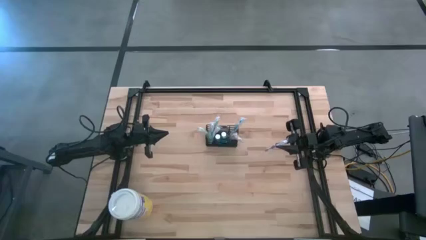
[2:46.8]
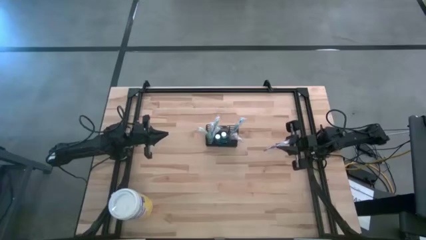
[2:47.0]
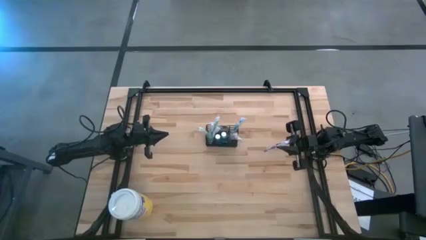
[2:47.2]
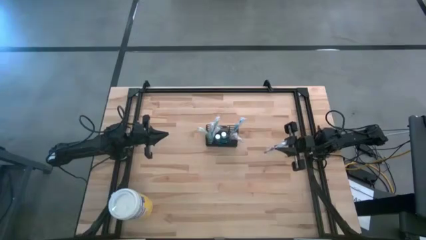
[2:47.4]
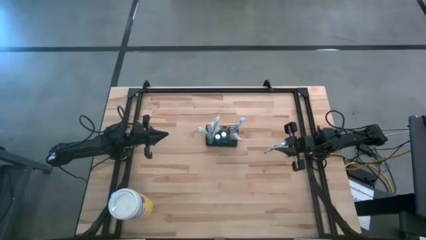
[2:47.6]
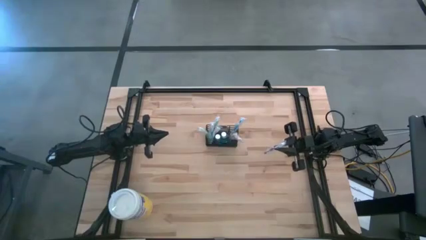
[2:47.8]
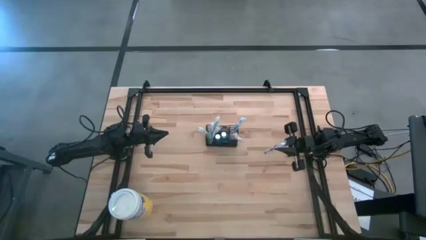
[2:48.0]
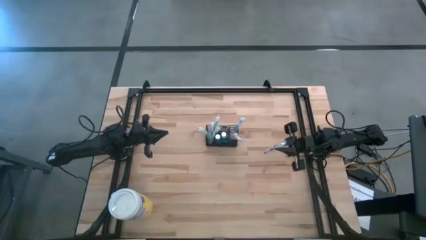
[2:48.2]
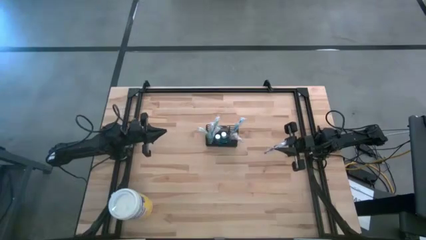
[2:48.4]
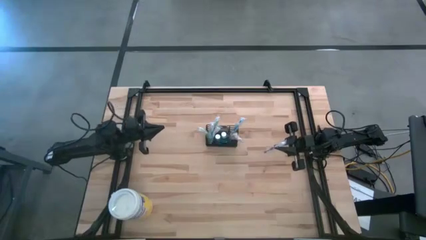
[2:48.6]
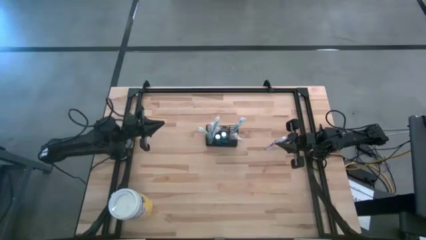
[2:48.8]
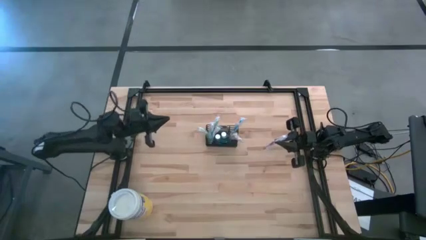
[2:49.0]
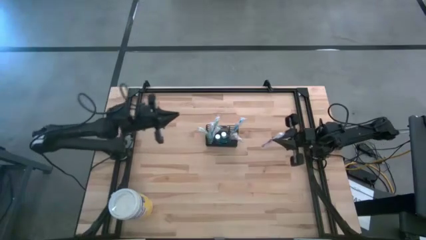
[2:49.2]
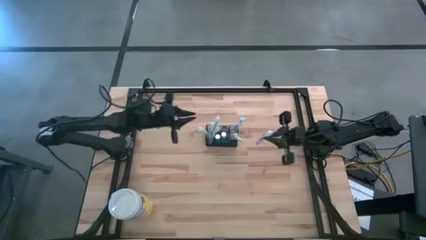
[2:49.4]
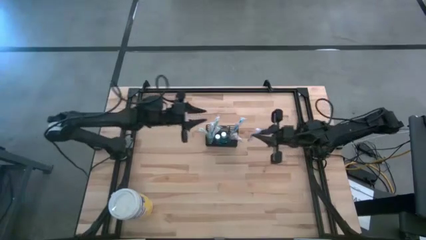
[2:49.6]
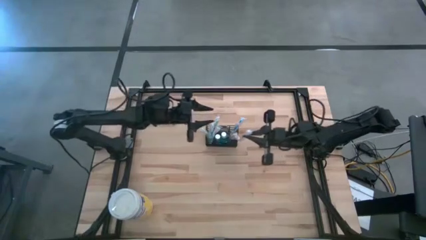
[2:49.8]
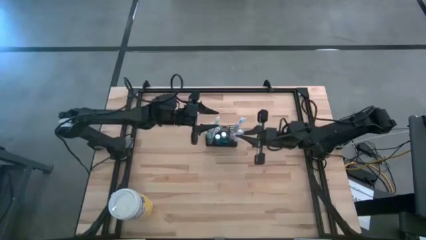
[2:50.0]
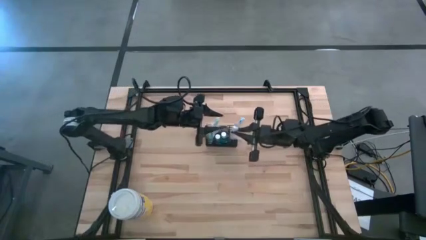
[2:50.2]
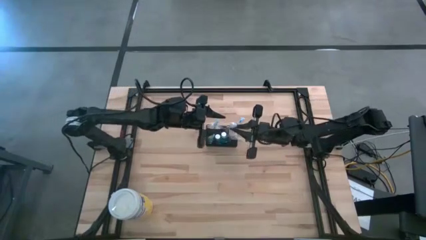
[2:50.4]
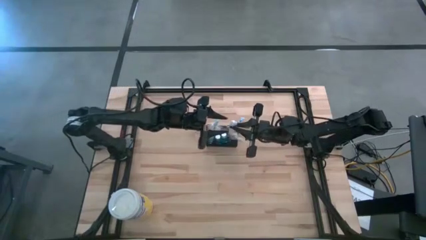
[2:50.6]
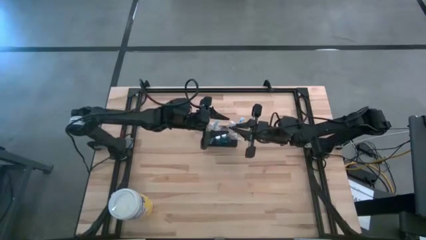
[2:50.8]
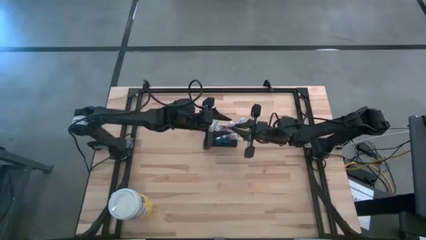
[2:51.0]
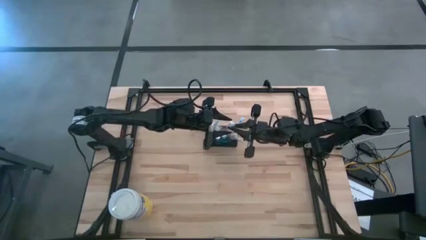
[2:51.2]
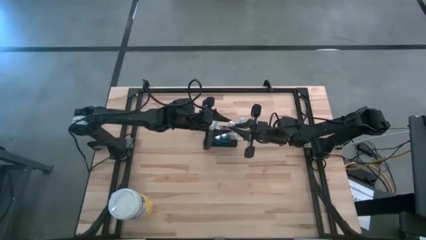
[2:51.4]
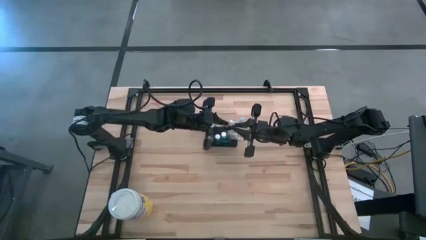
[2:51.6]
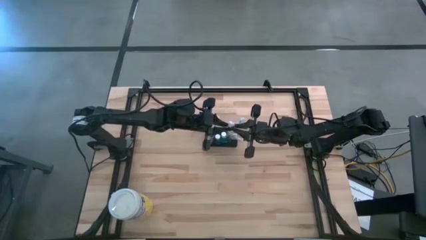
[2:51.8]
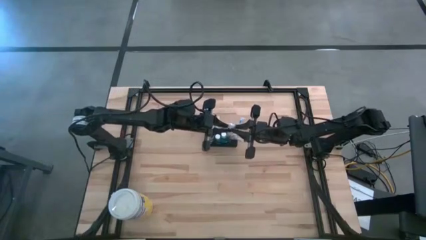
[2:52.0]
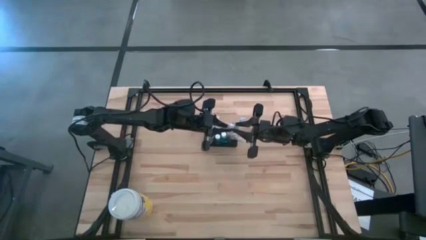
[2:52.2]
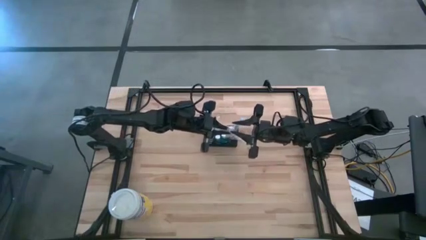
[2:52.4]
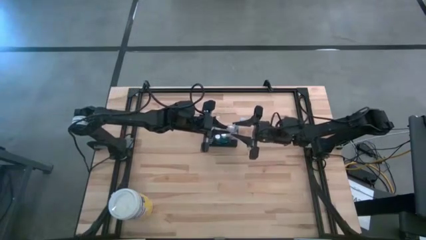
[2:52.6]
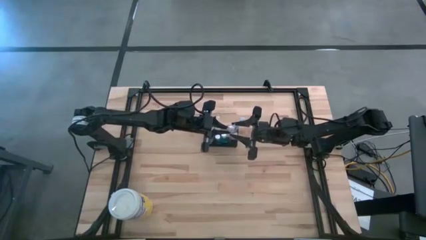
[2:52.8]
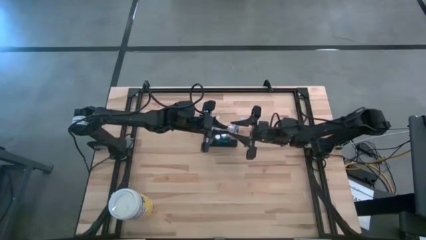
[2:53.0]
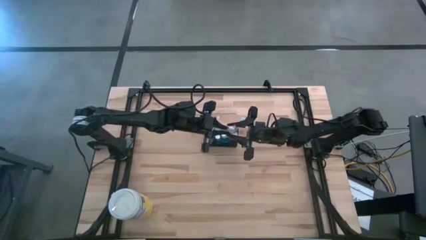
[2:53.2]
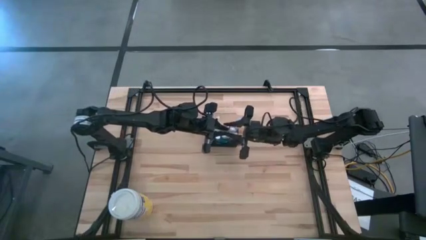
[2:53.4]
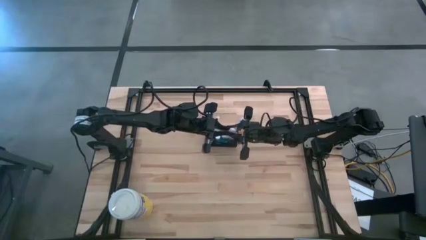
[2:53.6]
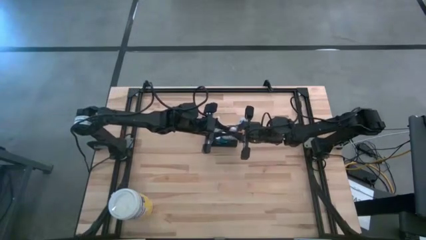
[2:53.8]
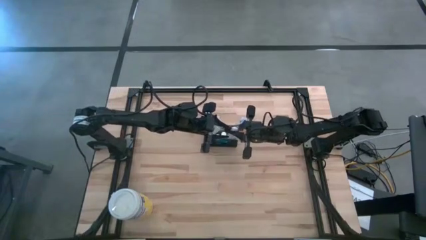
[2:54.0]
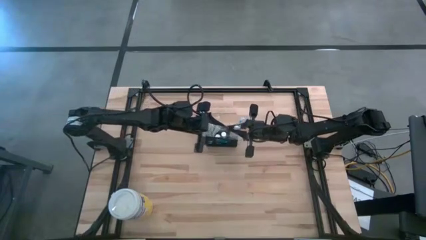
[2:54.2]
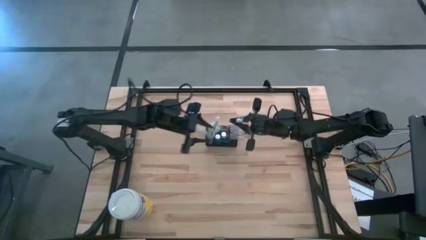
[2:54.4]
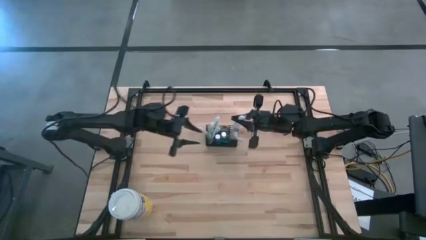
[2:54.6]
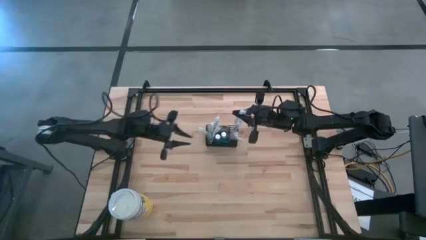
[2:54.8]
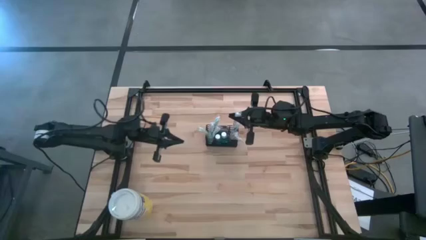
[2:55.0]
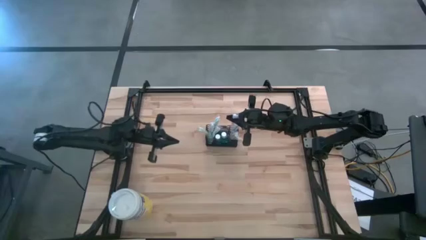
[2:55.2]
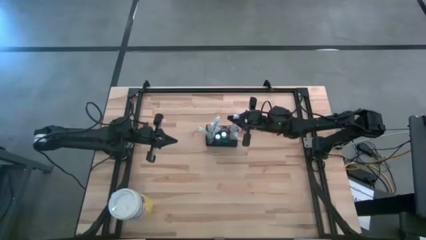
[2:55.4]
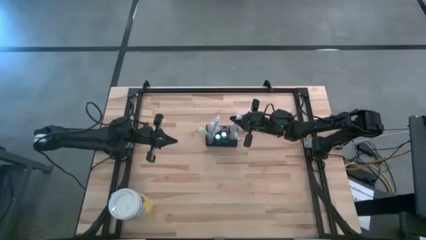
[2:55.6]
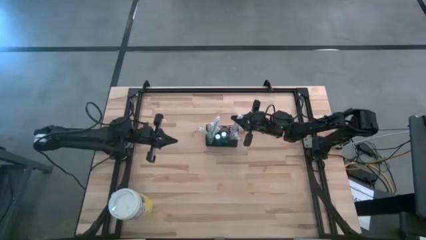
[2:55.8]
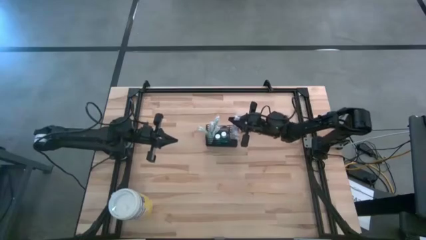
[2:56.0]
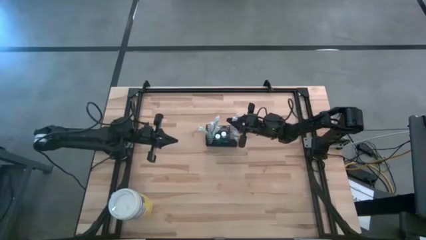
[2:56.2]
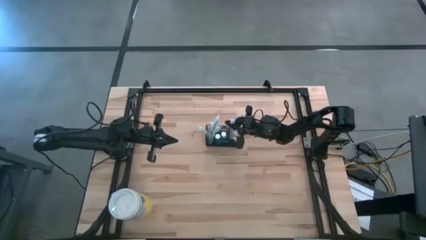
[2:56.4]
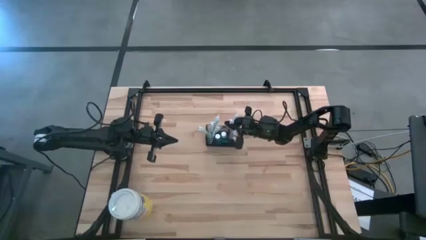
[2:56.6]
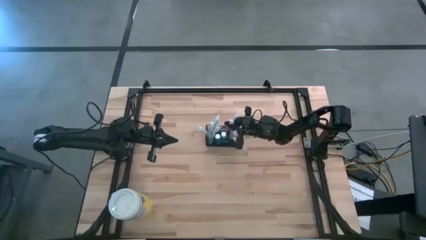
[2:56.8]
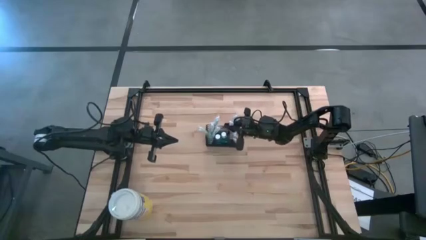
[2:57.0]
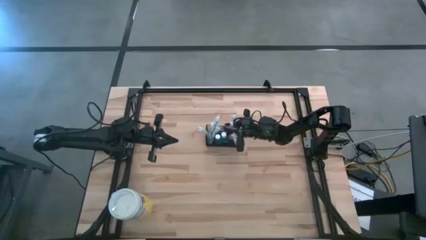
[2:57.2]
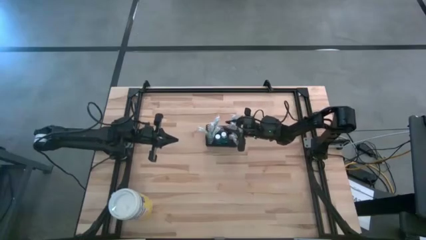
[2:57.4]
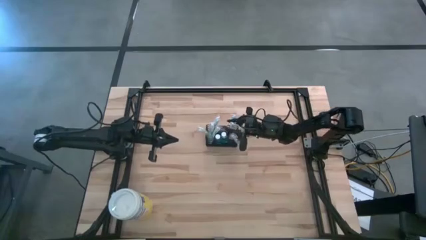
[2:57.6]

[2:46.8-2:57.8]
Task: Pick & Place toothbrushing station
Put the purple toothbrush into the wire organizer

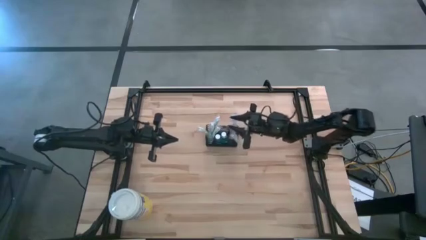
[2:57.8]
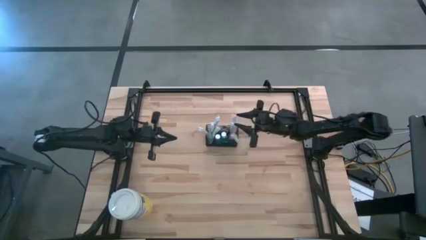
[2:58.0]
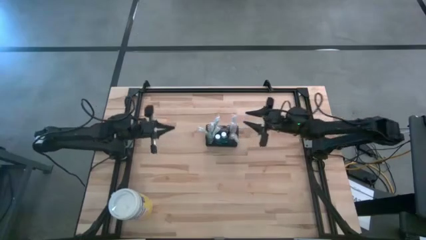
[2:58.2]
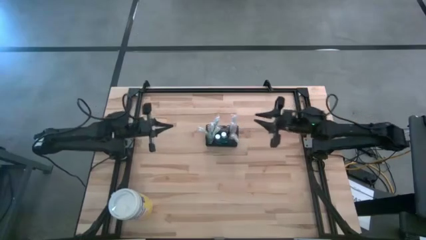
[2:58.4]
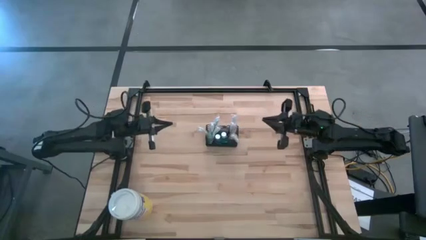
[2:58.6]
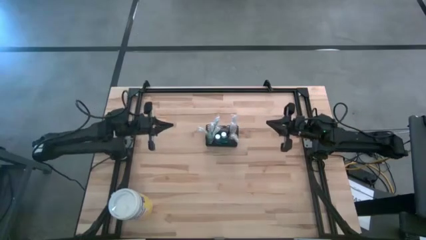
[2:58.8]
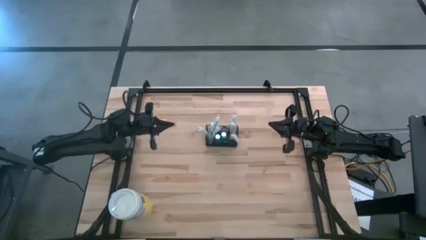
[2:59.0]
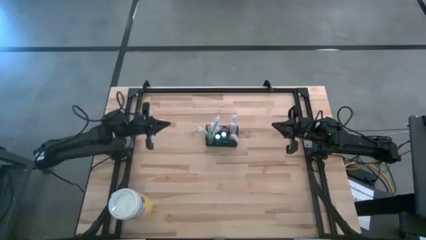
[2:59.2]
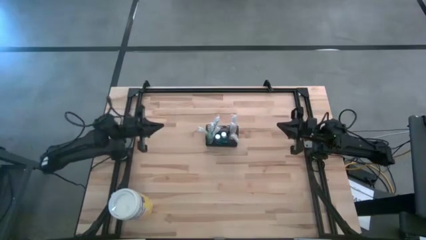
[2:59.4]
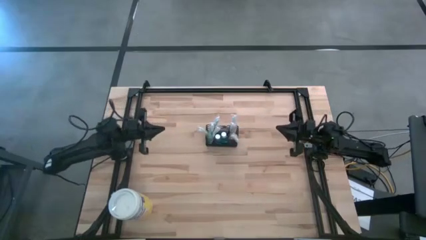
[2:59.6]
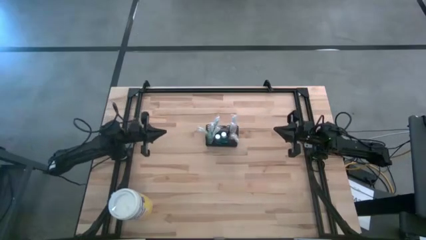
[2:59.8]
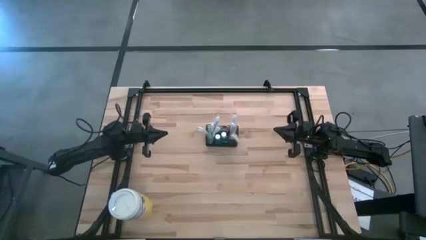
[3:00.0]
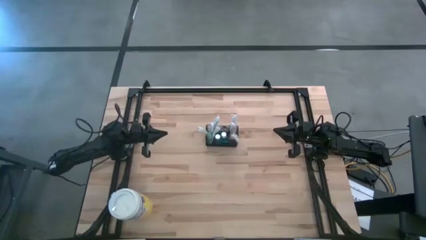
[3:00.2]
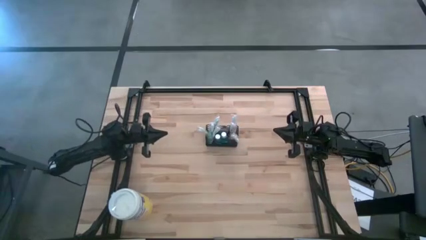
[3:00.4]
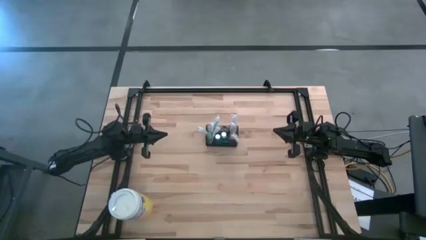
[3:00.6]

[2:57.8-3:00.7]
Return to Home Position

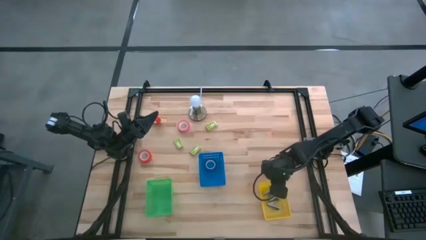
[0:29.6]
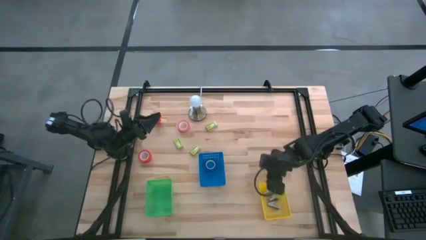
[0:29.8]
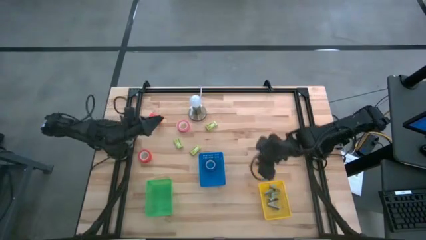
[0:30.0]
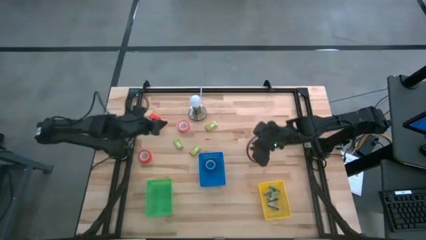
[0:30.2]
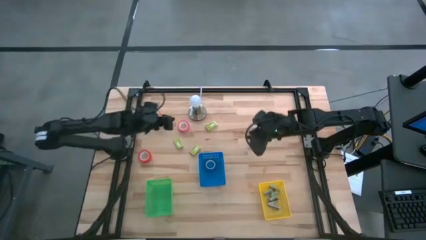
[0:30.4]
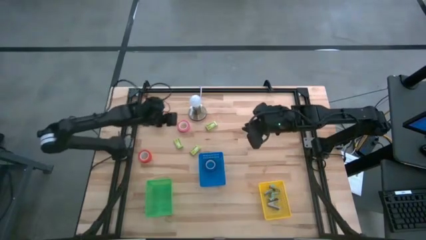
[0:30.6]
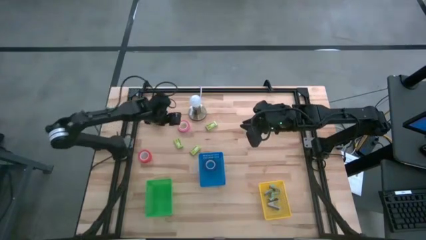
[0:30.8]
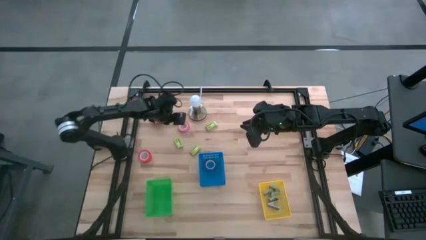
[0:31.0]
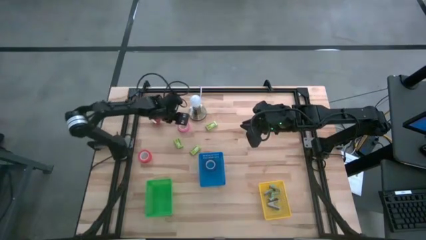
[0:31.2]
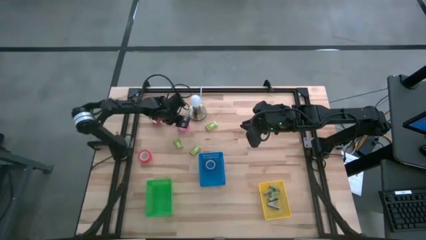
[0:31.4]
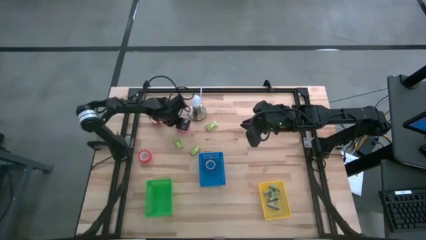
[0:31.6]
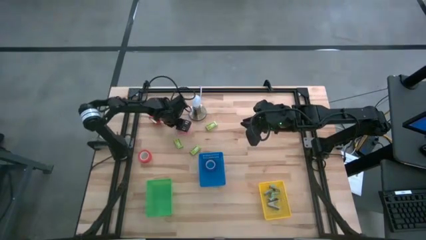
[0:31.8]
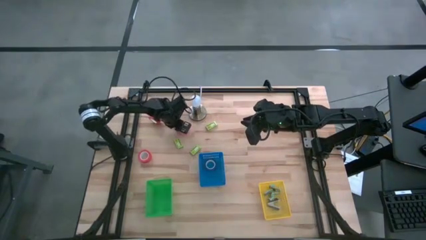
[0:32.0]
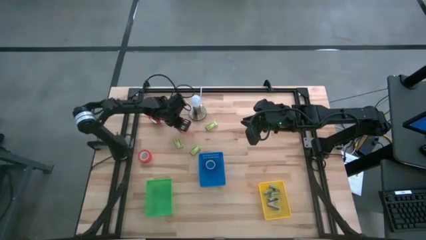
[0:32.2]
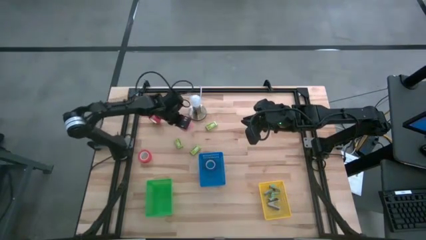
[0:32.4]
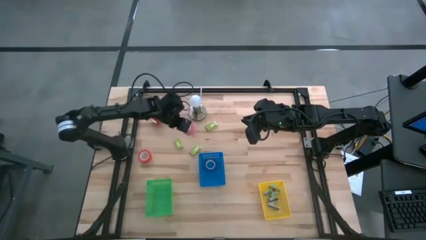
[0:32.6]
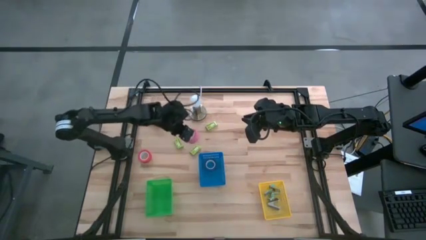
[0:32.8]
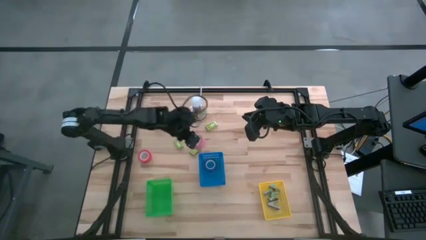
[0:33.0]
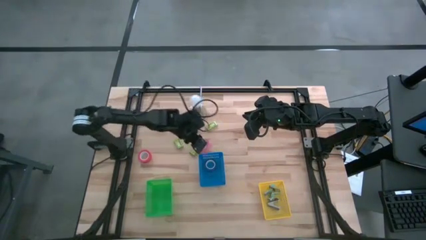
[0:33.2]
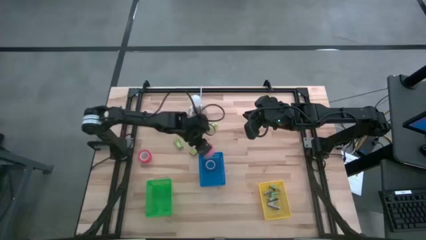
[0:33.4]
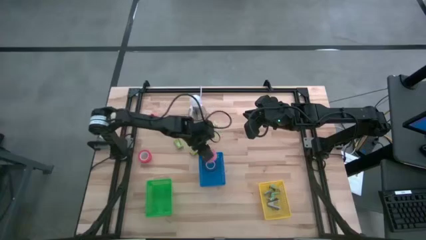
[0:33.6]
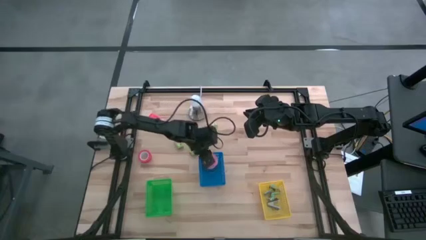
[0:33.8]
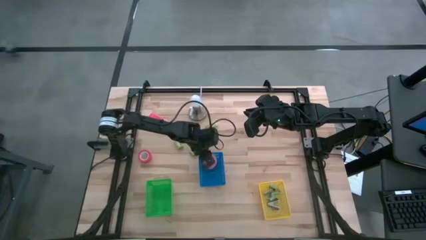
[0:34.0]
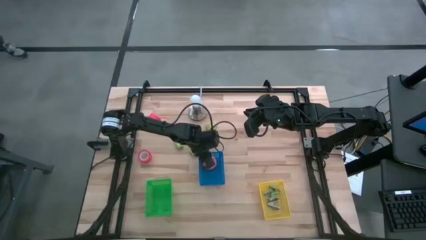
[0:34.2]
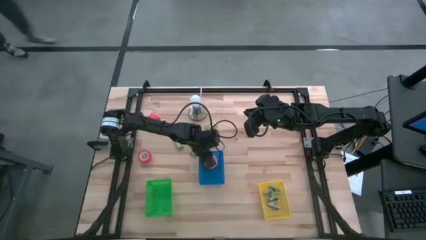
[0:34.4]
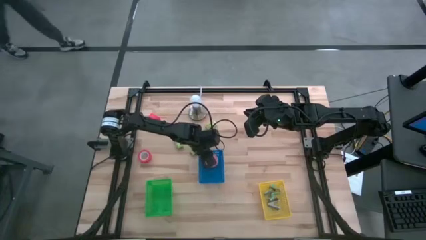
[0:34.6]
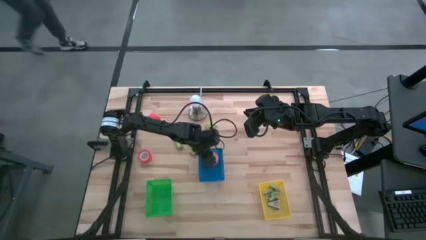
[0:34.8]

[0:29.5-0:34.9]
Task: Pick and place Stapler, Stapler remover, tape
Put the pink tape into the blue bin
